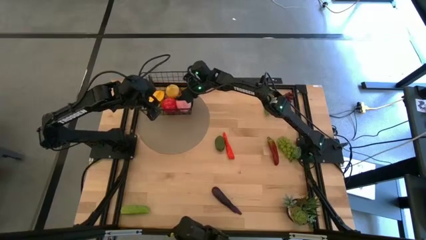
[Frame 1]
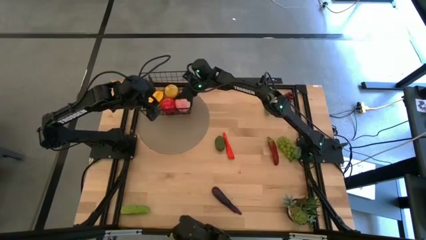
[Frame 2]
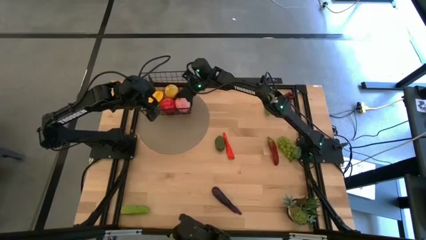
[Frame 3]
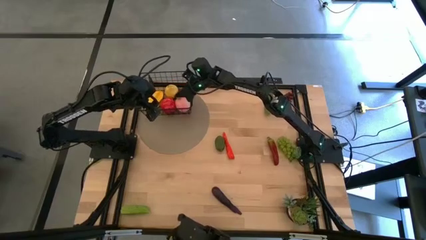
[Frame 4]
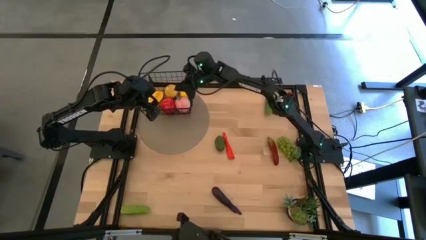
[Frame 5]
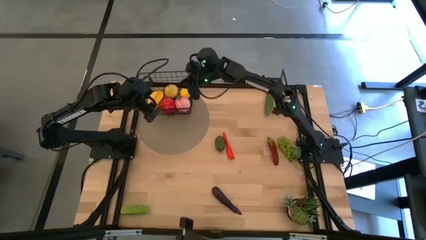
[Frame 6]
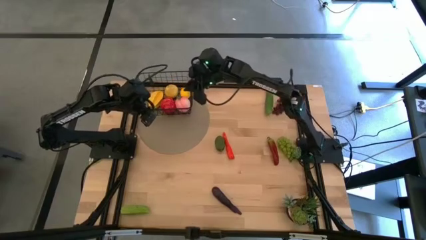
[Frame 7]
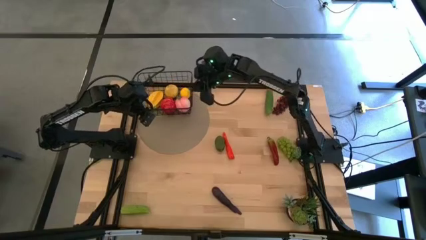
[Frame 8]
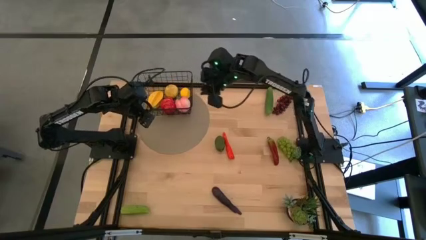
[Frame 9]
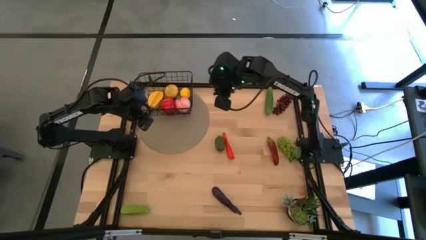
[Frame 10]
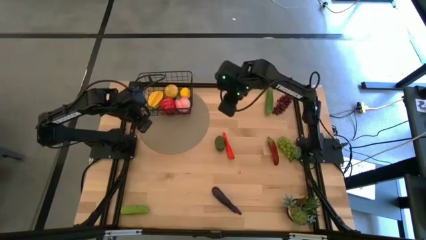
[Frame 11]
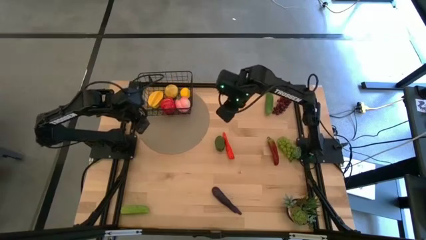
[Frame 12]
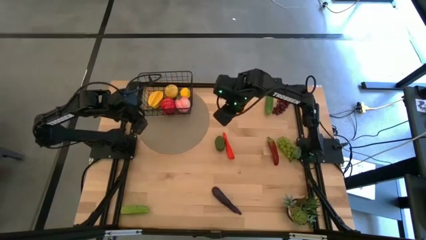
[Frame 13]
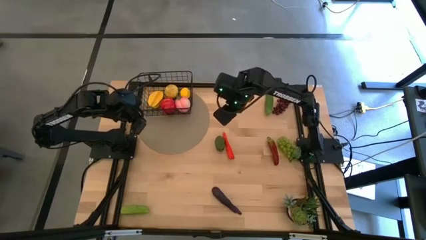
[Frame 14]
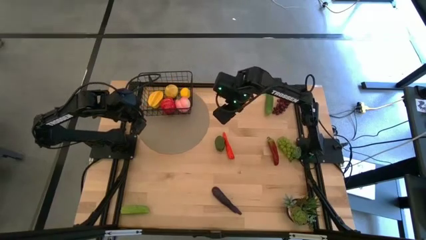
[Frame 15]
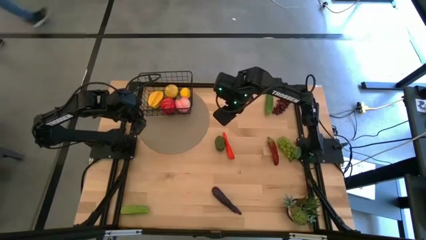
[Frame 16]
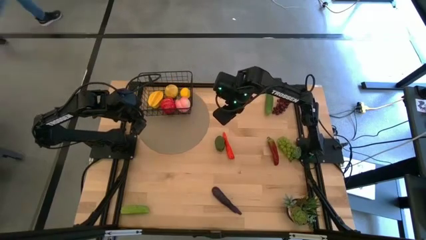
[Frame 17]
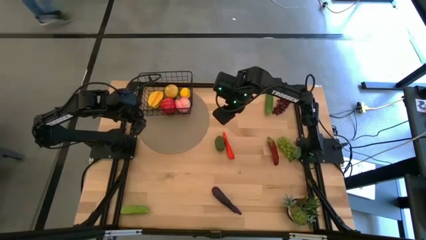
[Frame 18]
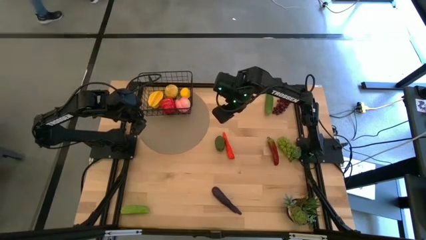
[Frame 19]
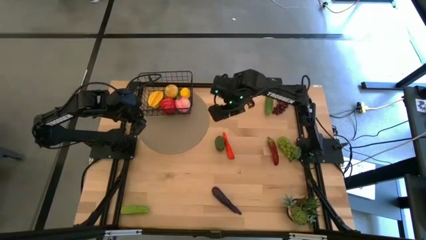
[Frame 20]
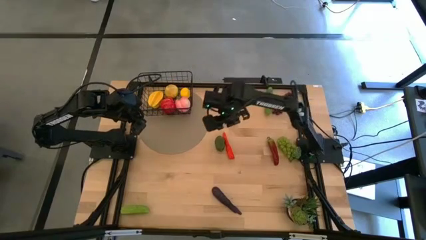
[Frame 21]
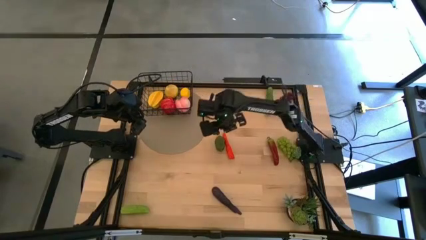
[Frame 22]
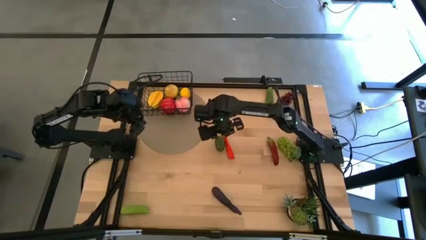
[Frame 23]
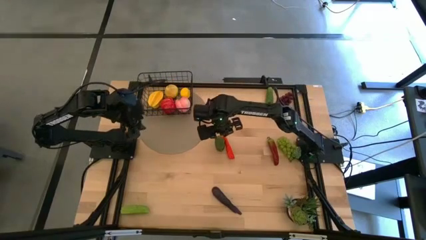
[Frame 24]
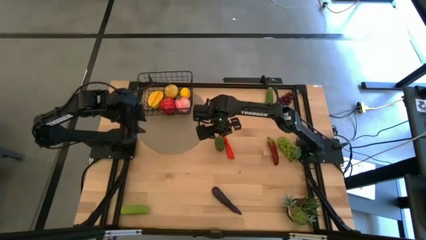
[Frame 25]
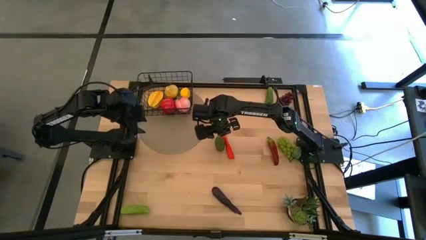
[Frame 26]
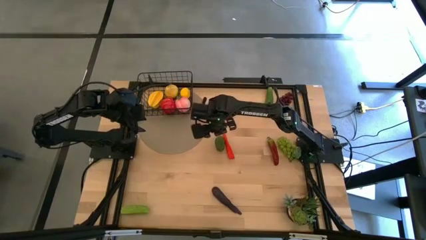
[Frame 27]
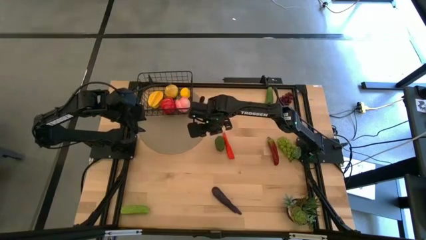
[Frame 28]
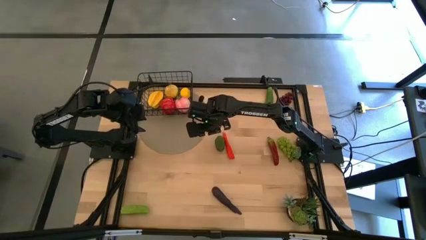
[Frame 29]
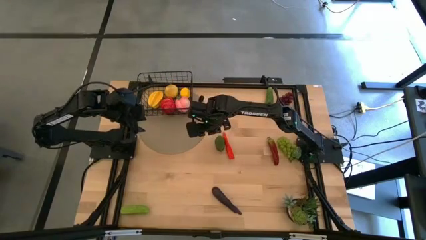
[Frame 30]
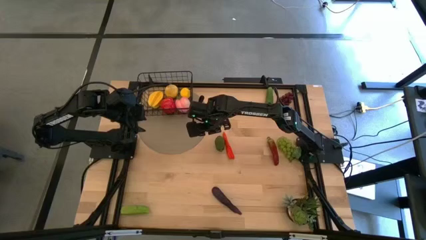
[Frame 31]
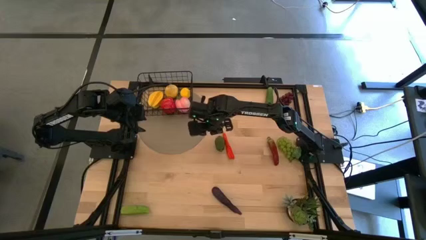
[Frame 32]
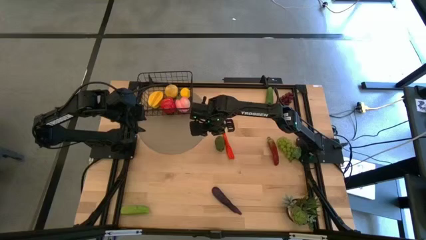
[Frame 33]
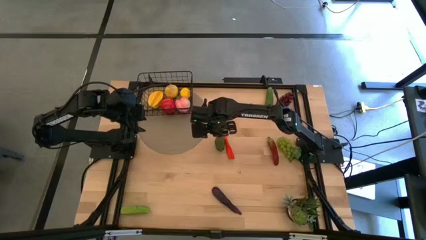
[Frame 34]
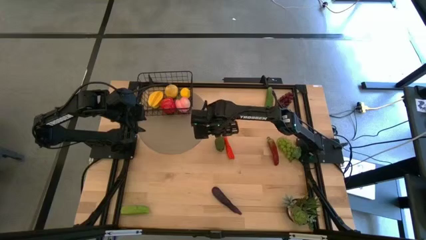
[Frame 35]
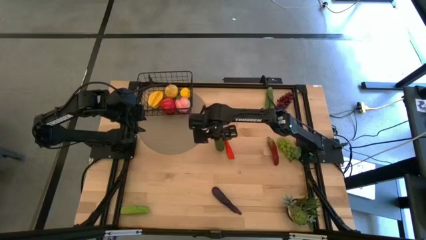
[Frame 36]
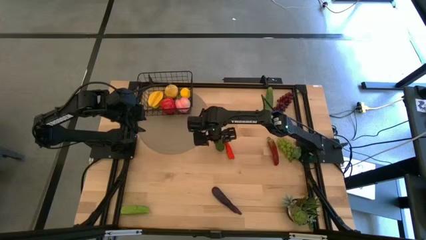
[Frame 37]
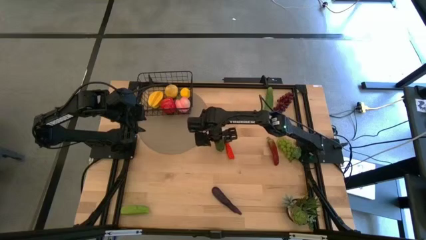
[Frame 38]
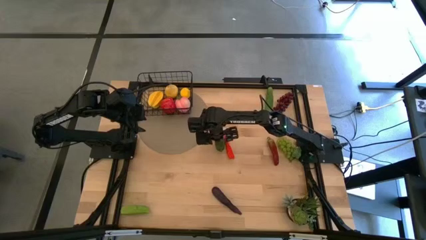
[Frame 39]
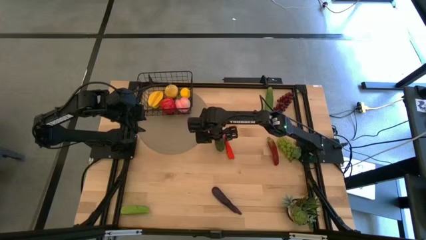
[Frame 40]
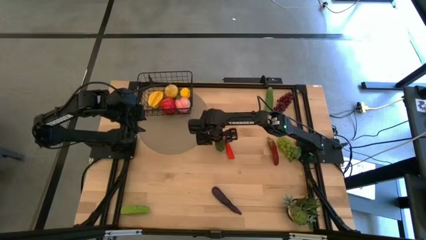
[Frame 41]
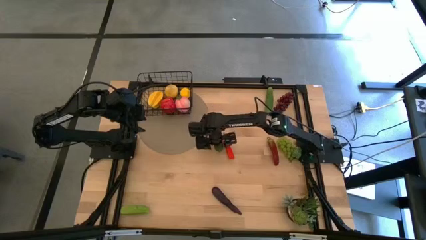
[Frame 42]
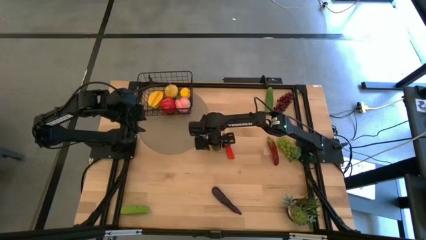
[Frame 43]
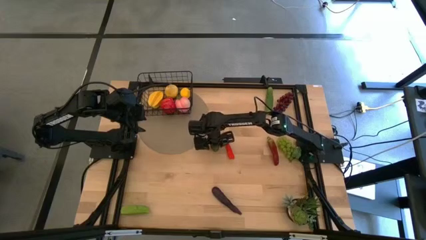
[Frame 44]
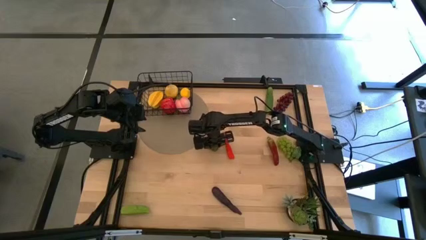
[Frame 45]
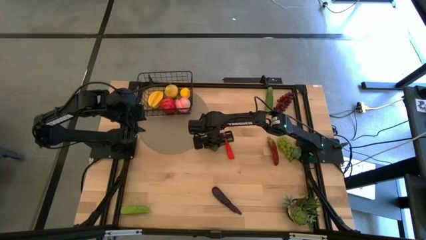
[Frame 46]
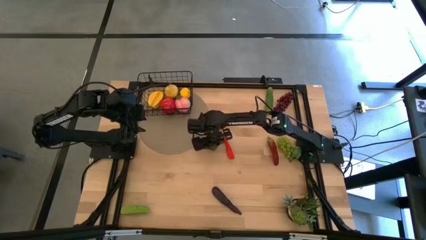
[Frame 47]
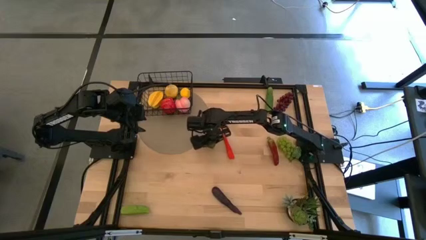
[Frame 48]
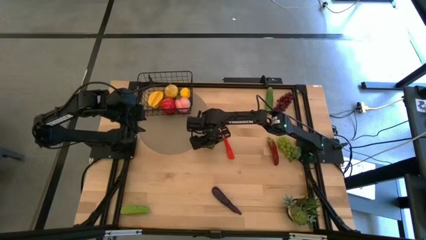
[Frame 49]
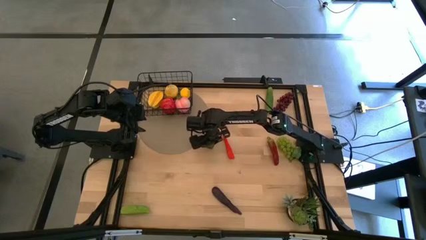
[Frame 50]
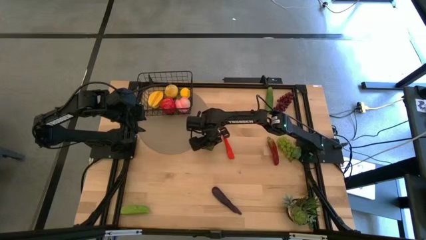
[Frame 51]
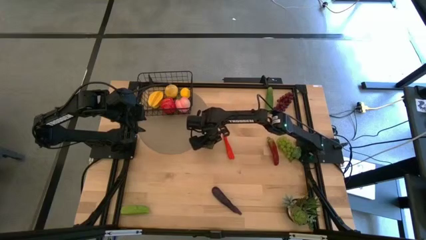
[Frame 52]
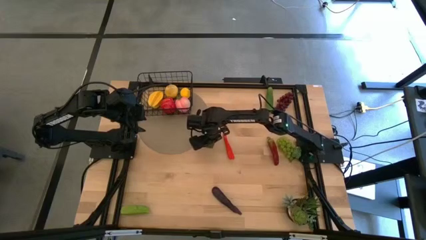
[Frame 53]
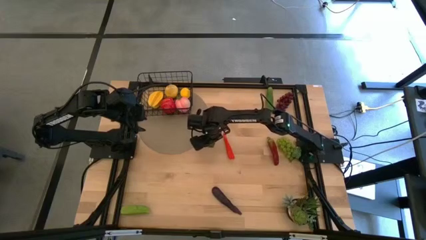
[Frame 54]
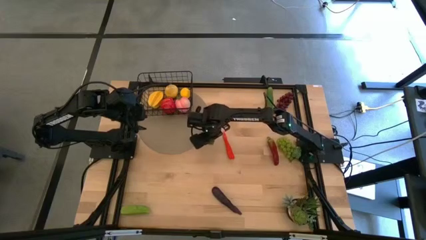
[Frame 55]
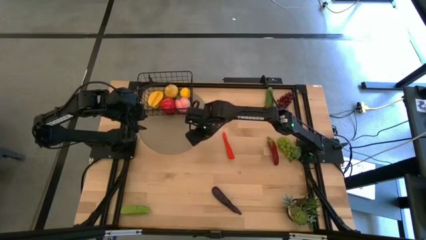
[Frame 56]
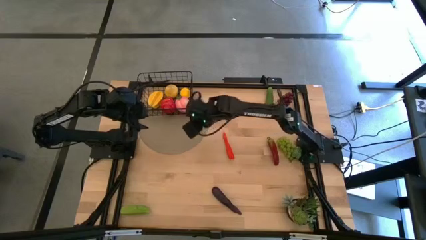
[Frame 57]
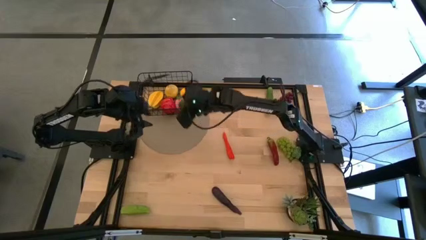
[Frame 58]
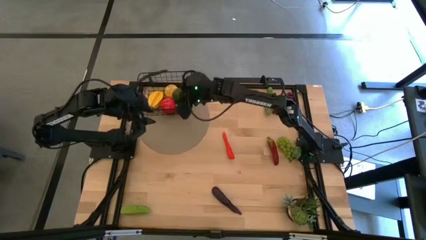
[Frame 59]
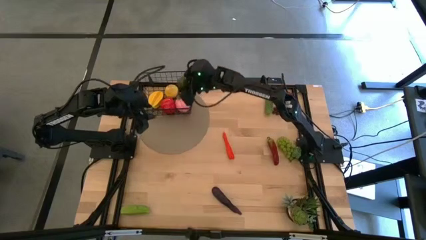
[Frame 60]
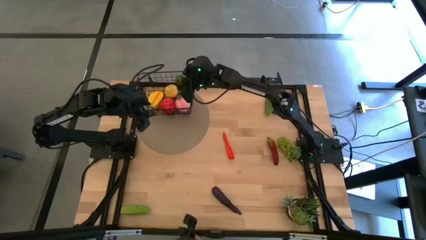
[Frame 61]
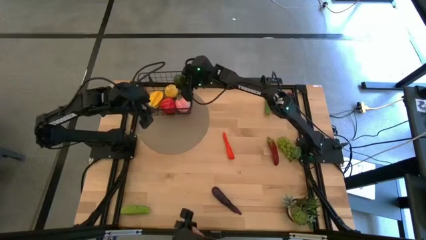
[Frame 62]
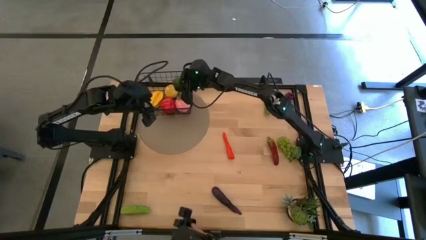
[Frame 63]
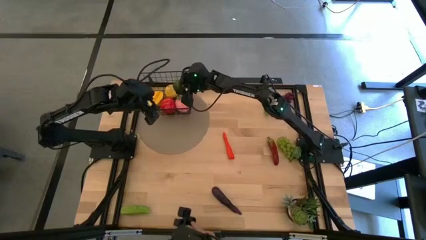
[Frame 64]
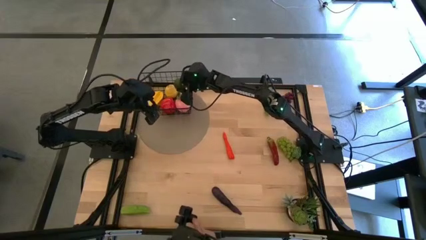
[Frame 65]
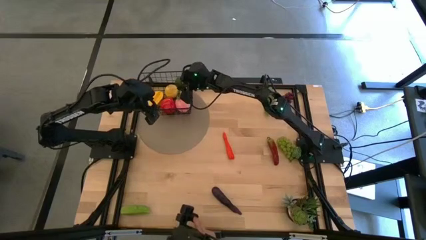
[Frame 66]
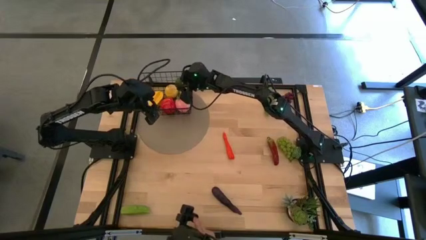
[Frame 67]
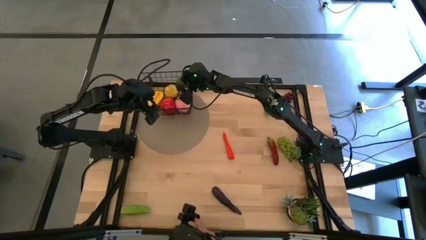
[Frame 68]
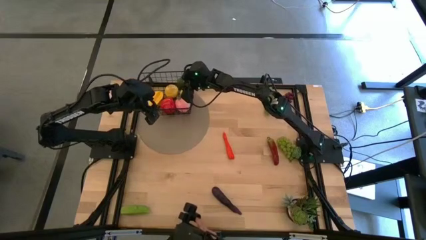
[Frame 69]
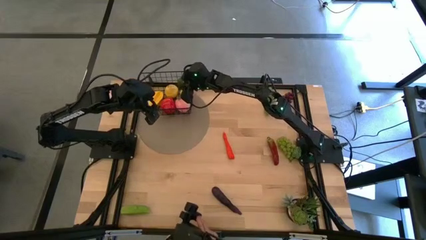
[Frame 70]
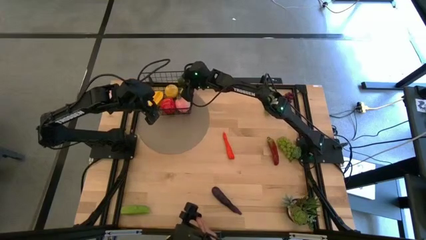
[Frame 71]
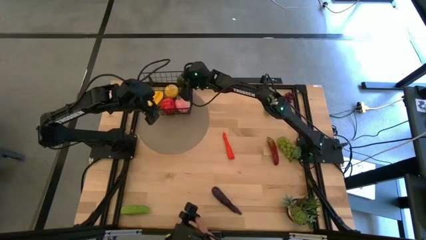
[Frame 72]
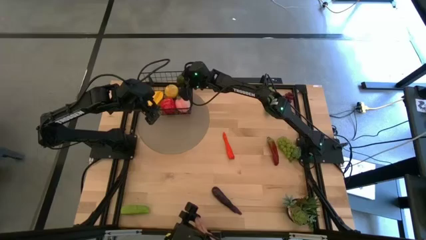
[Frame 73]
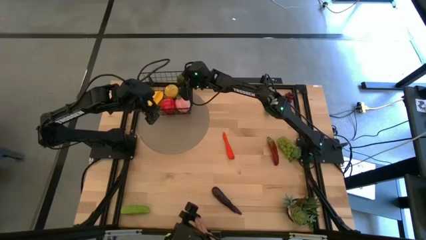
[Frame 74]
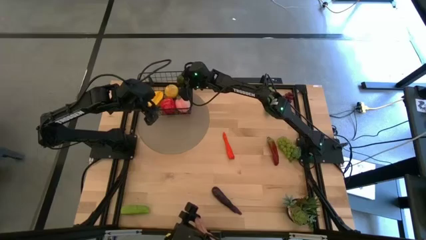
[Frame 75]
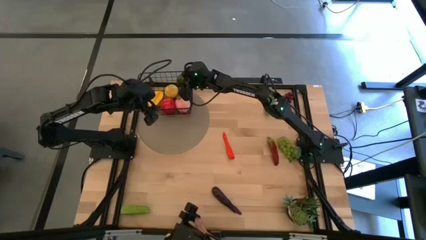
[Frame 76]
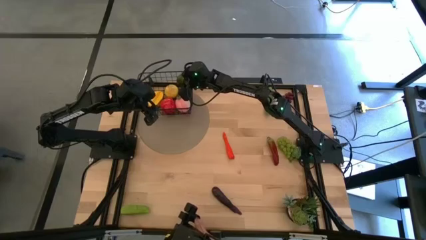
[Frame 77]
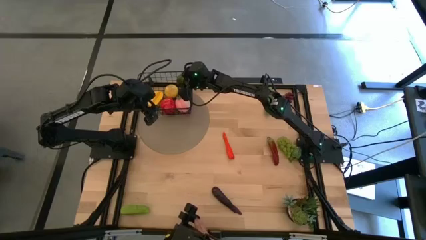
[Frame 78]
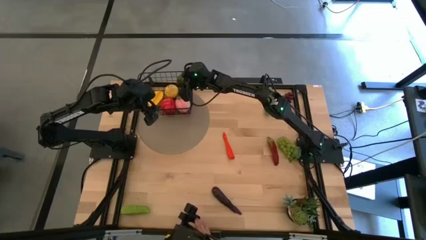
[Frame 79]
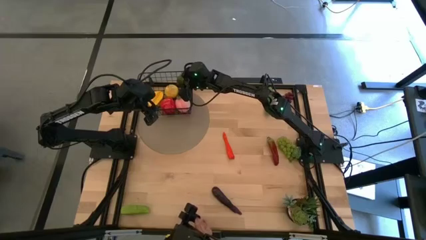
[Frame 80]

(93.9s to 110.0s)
Task: Build produce basket
Put the green lime into the black wire basket
